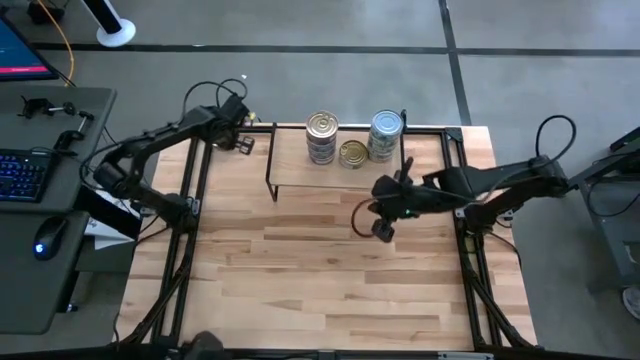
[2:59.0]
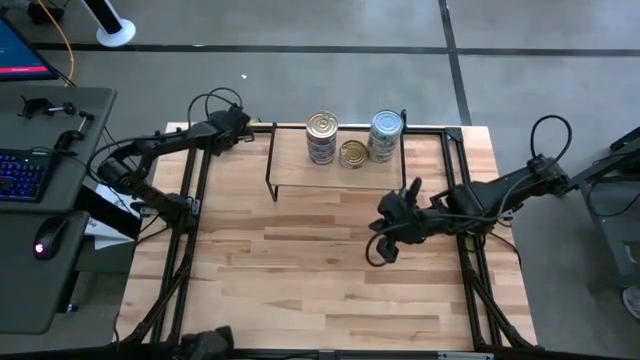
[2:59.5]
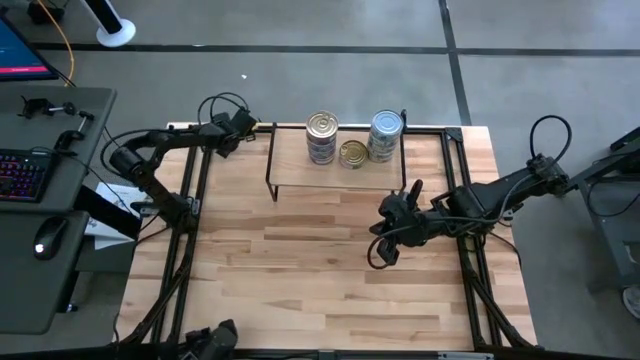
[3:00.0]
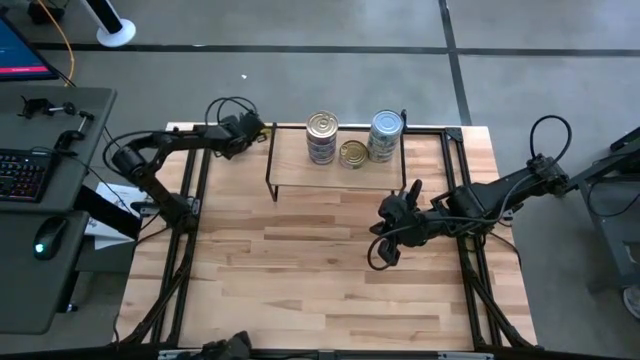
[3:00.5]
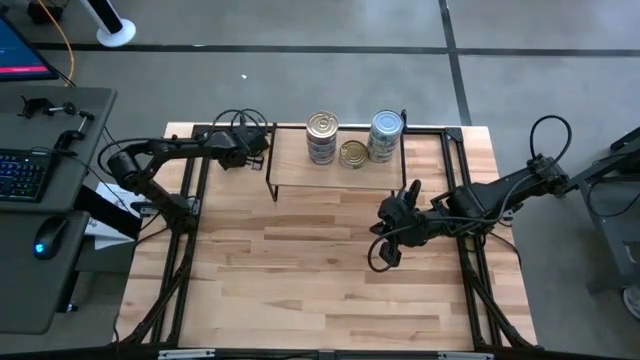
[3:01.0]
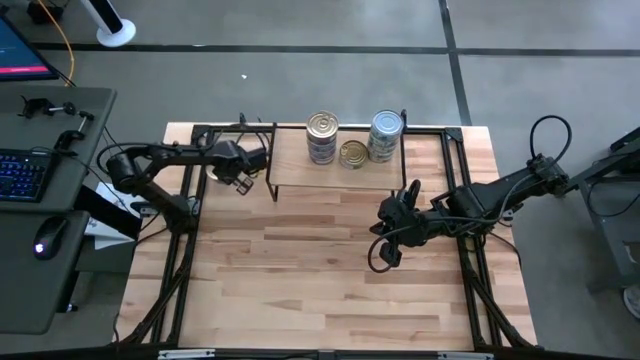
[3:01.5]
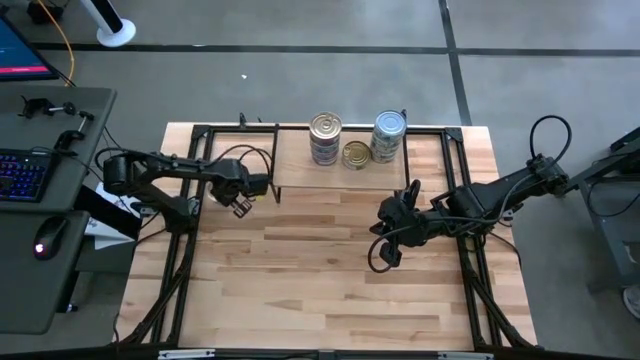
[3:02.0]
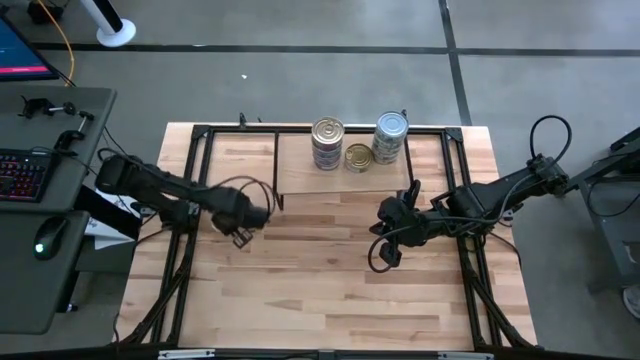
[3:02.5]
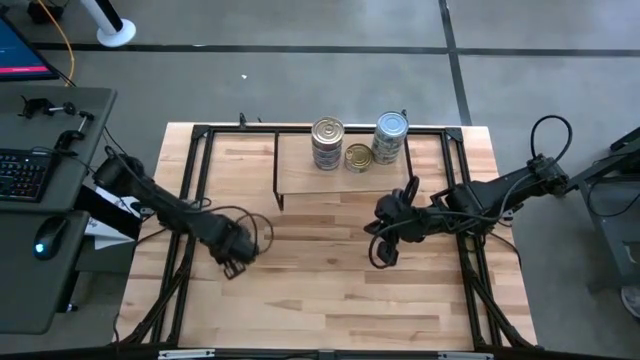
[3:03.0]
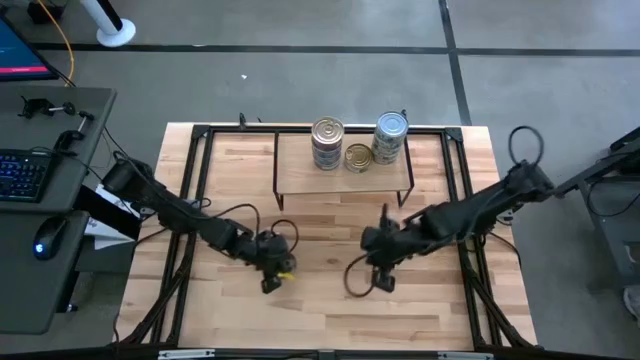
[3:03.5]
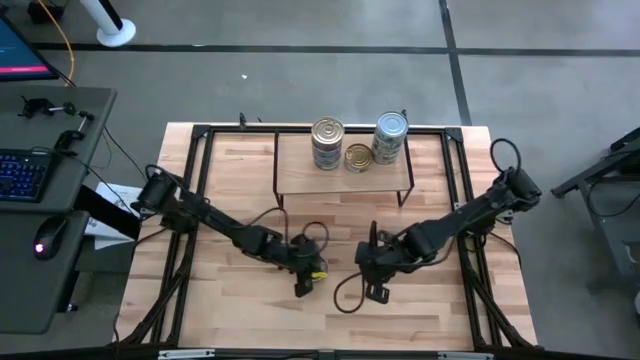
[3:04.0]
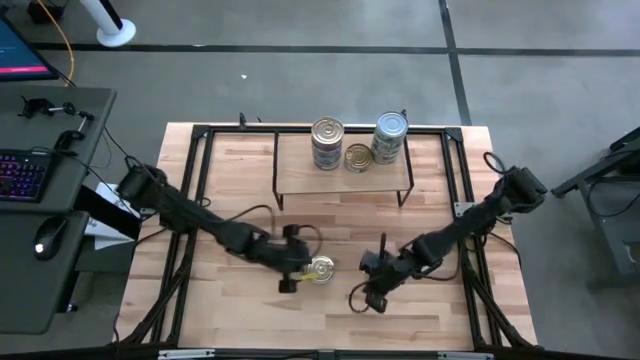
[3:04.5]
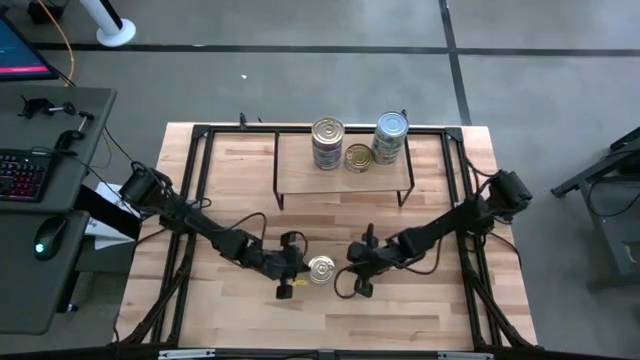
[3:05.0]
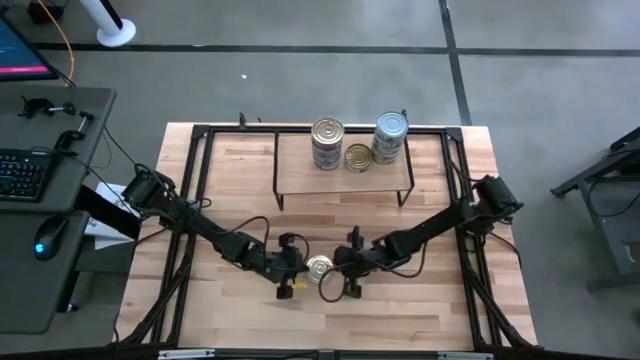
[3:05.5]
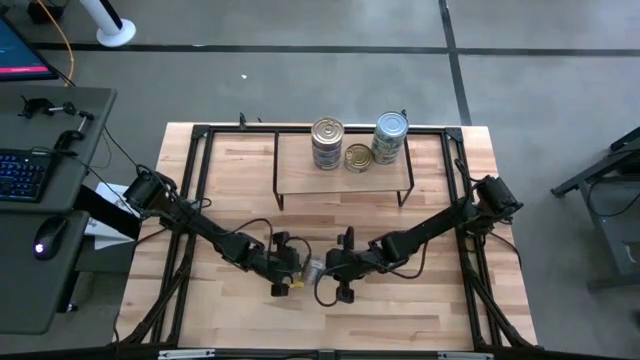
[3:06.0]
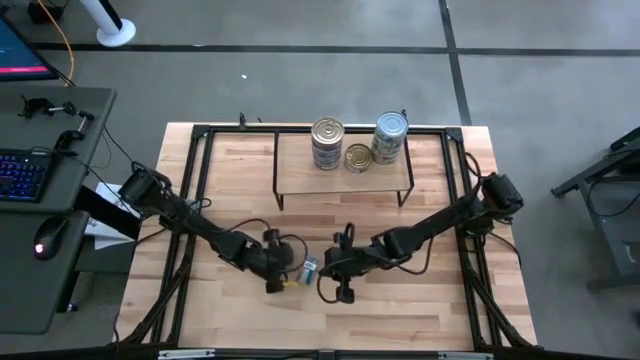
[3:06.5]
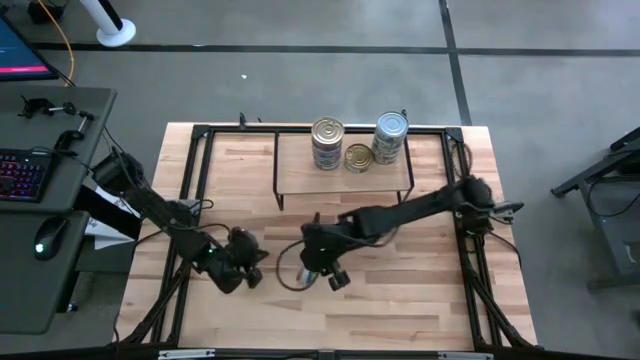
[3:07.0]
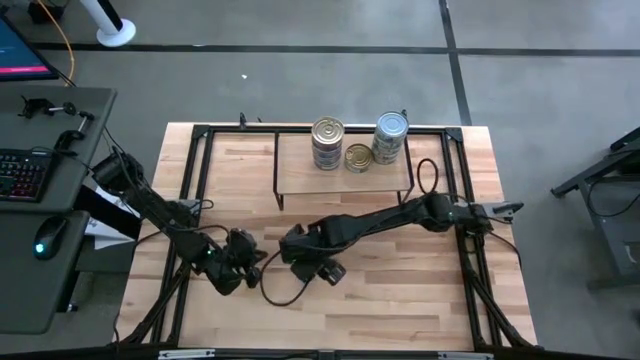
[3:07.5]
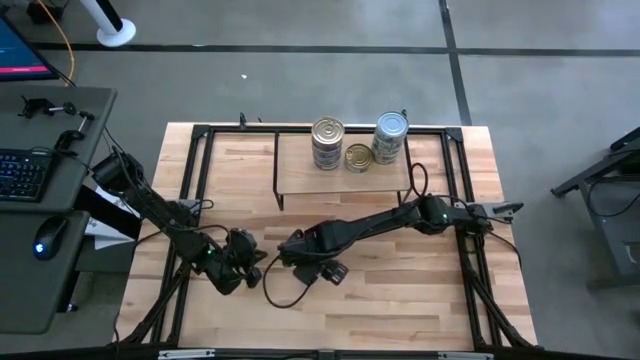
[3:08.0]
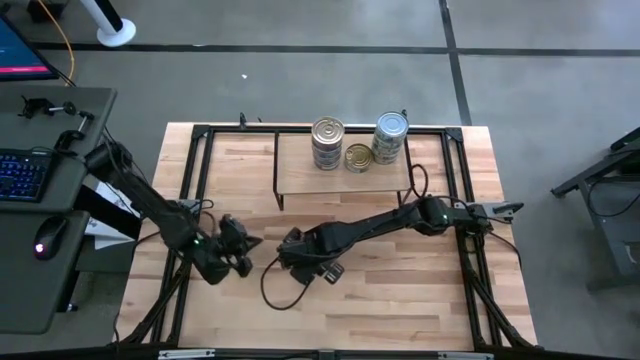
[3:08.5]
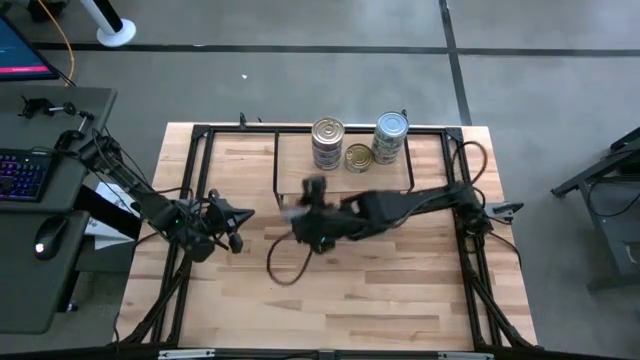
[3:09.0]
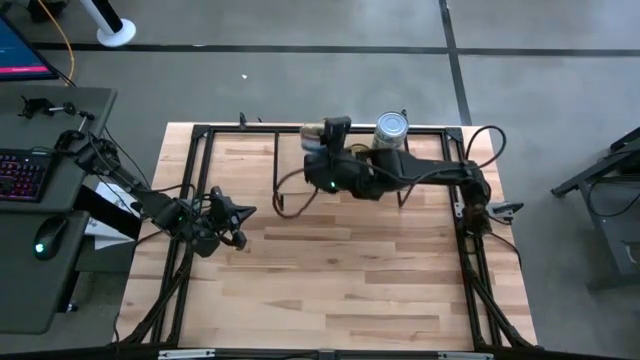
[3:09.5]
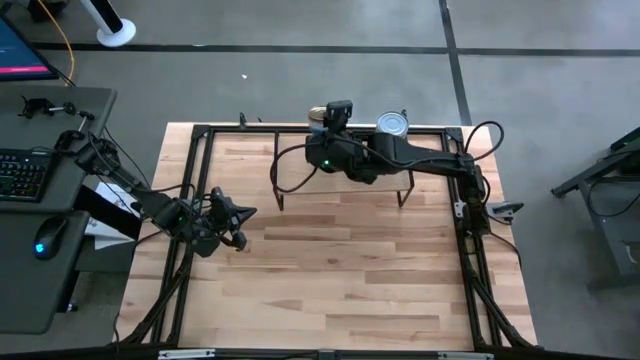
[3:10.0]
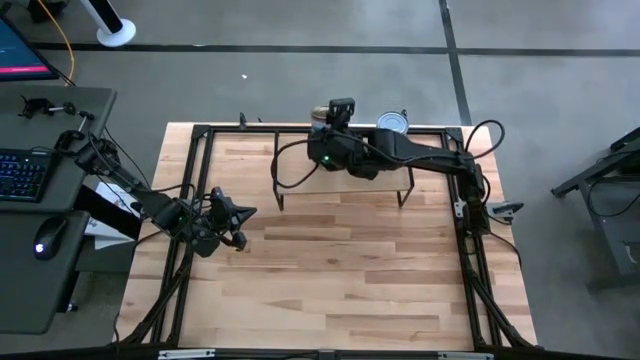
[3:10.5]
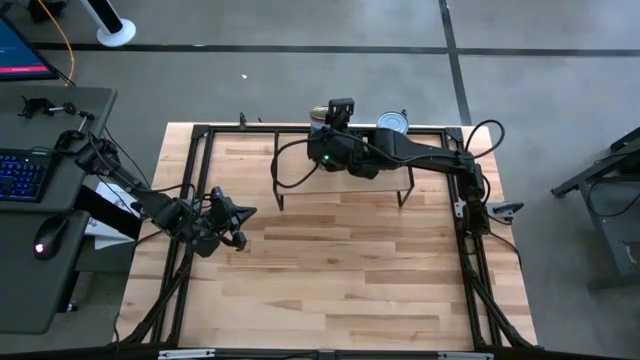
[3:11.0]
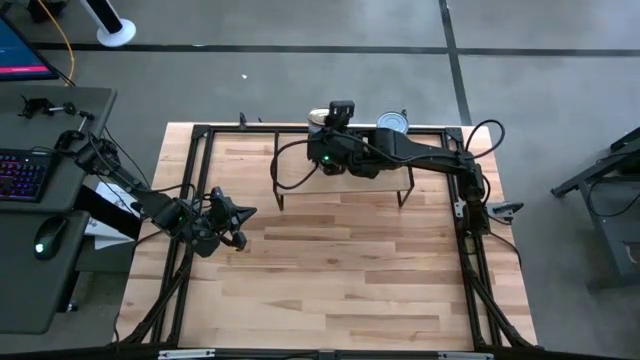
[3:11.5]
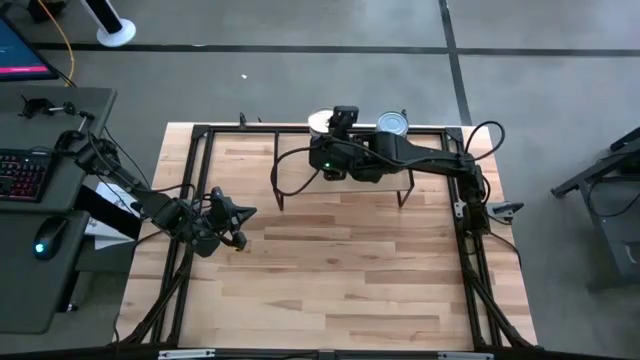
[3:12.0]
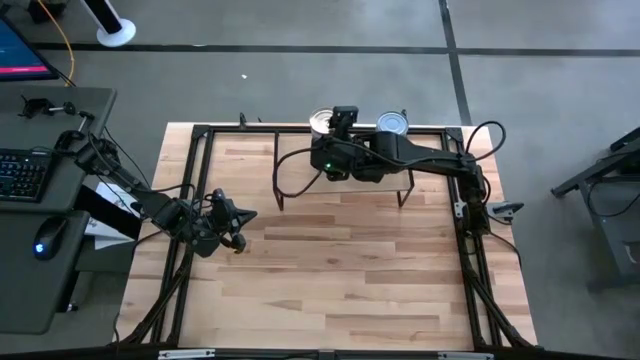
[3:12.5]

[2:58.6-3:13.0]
Task: Stack canned seafood by type on shelf
Stack the blue pink tuna can on top of the other blue pink tuna can on the shelf

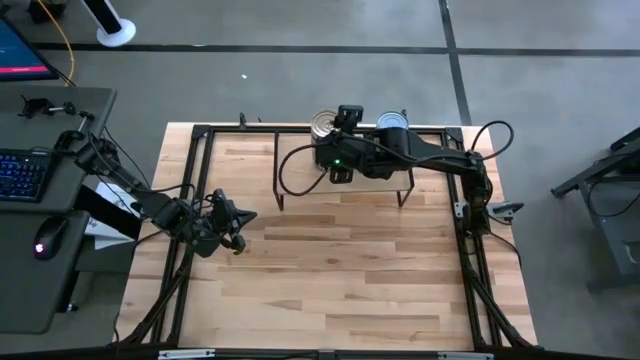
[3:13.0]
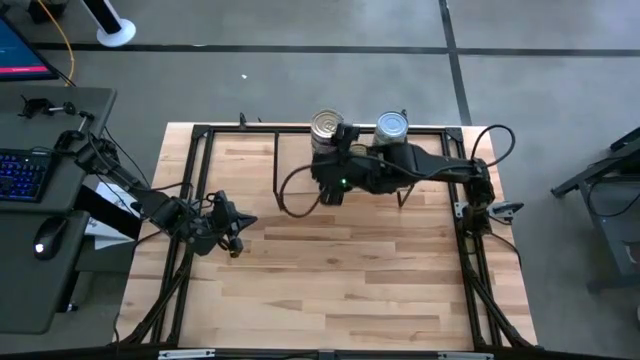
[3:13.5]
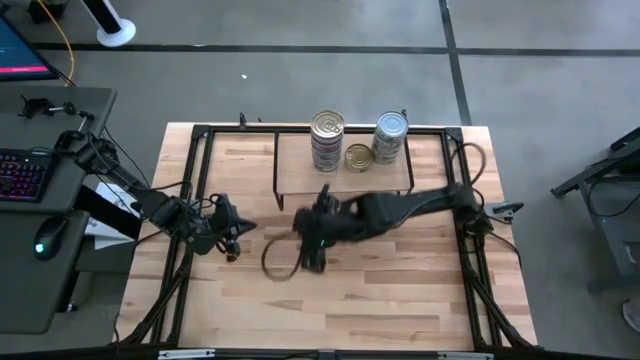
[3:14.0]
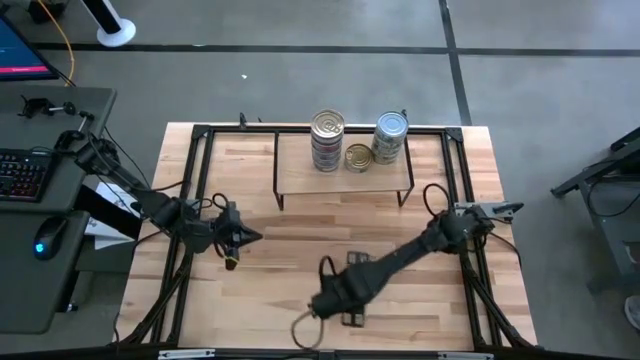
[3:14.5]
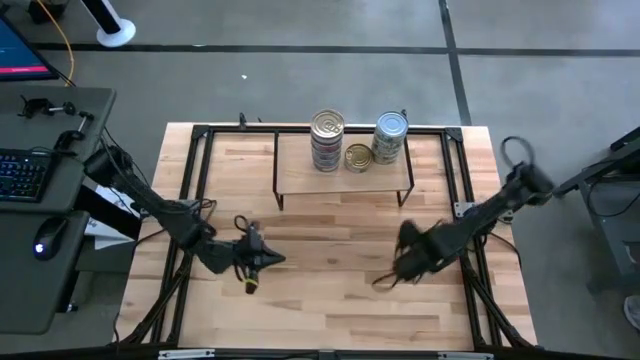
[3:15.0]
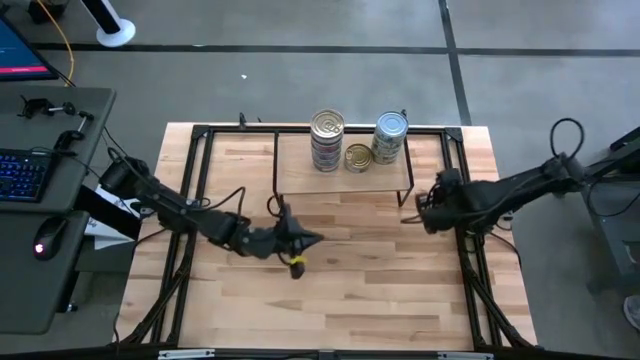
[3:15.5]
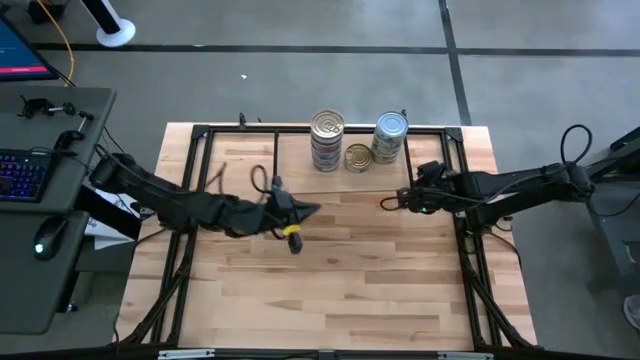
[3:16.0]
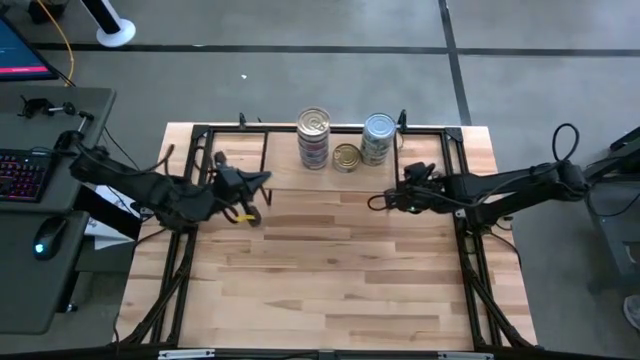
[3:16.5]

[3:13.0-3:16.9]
Adjust the shelf on the table

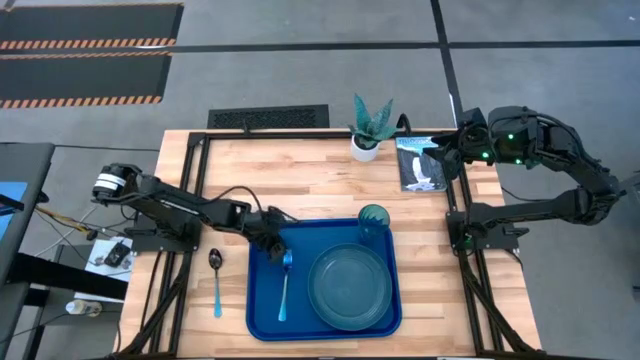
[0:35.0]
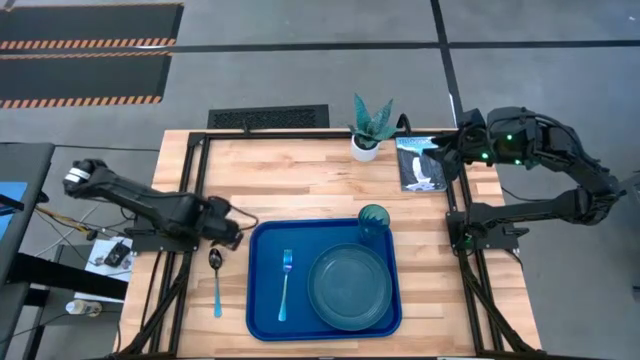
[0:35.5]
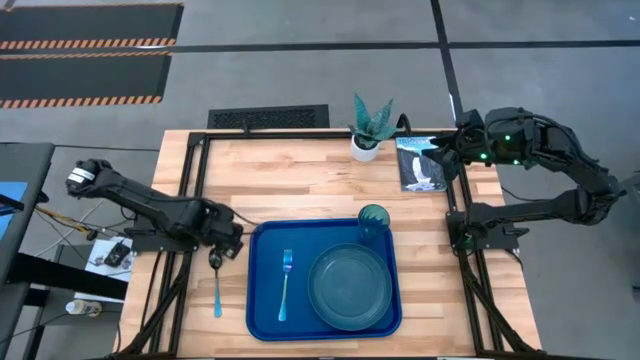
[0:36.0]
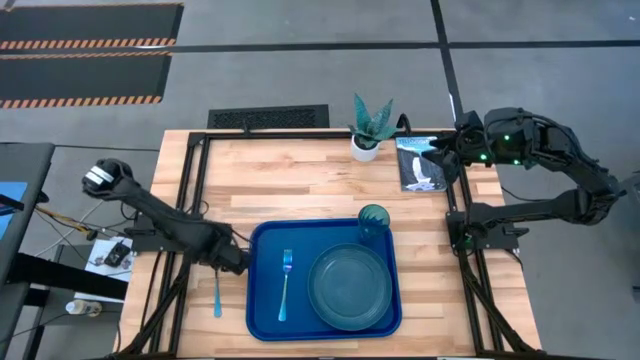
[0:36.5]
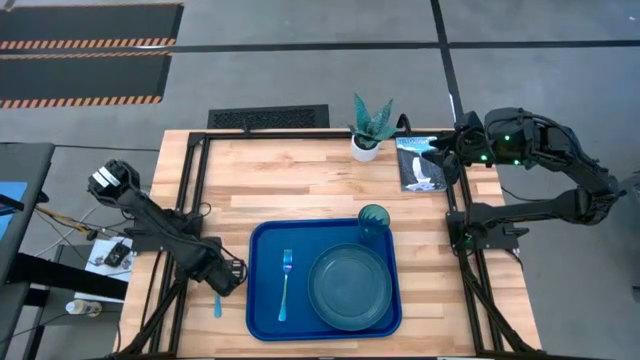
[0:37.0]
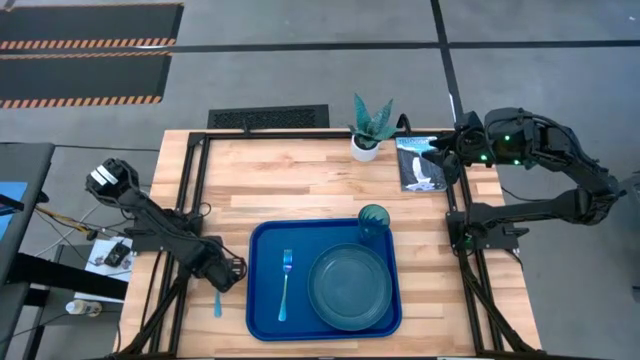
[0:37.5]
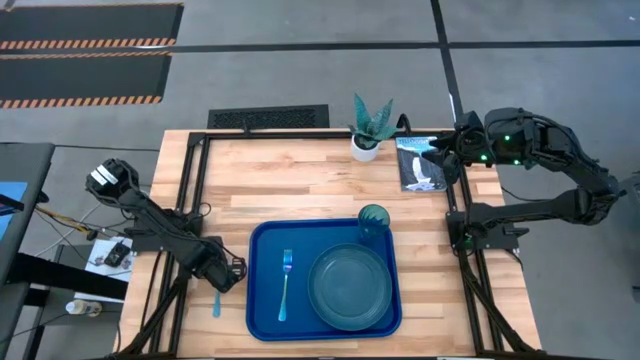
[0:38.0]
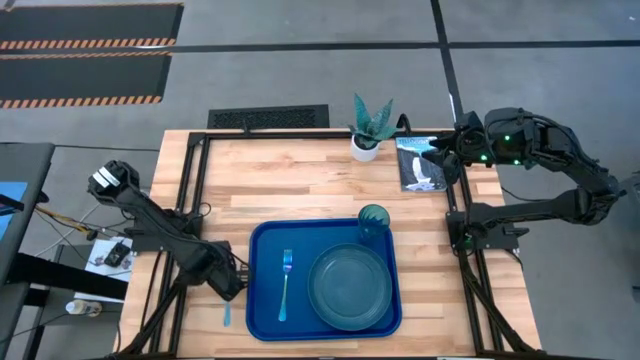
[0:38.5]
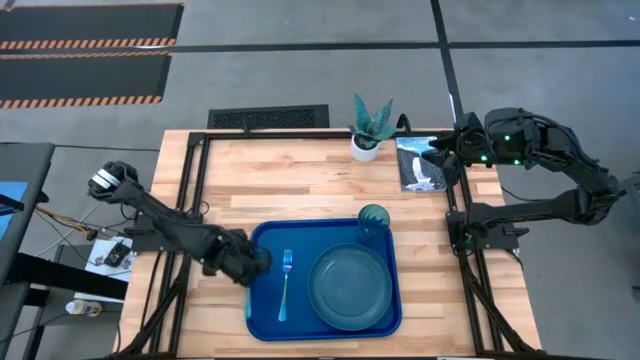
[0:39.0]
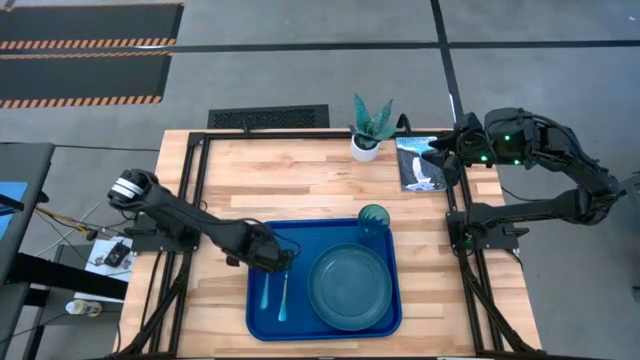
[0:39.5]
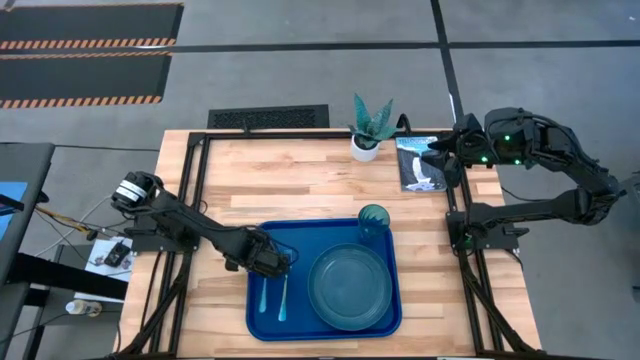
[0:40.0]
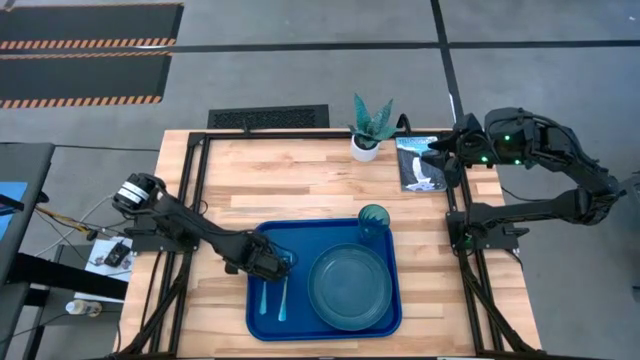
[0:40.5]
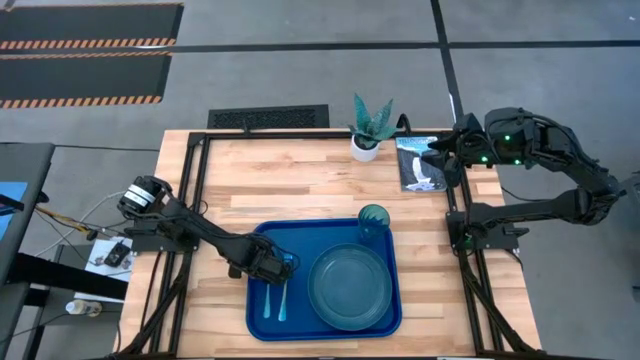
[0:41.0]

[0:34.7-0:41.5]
Task: Pick and place plate/cup/fork/spoon on tray
Put the blue spoon on the blue tray to the left of the blue fork
